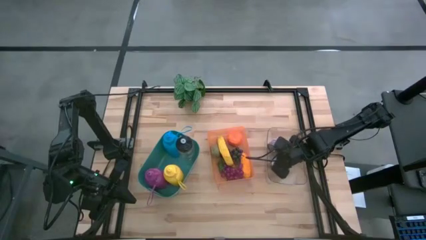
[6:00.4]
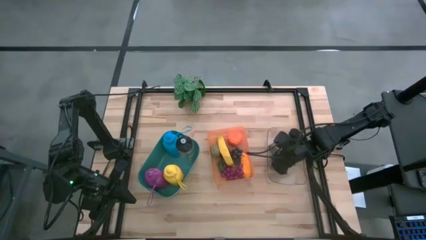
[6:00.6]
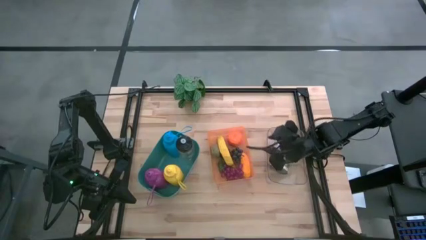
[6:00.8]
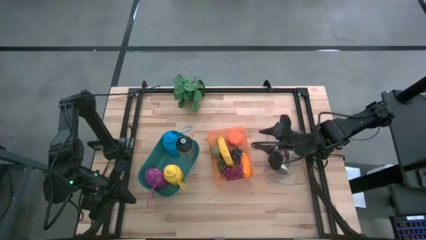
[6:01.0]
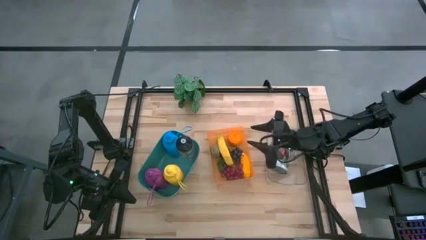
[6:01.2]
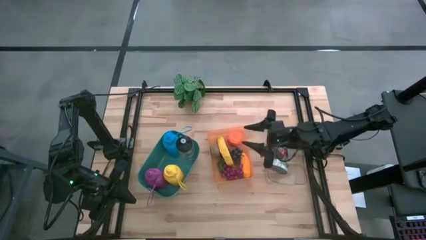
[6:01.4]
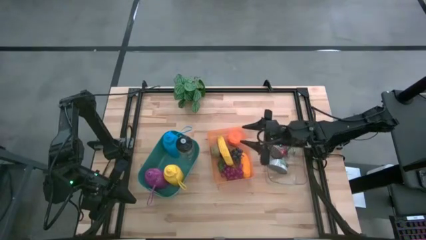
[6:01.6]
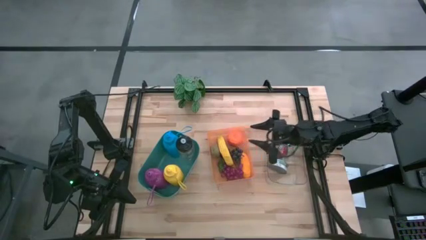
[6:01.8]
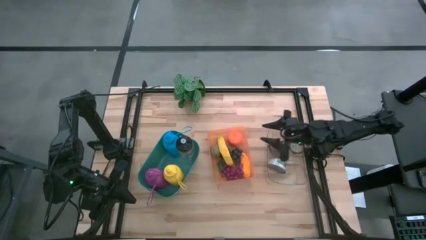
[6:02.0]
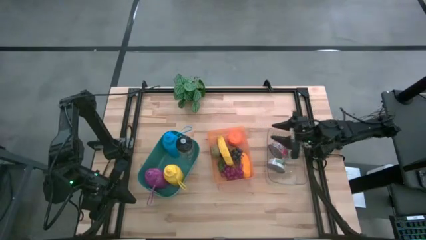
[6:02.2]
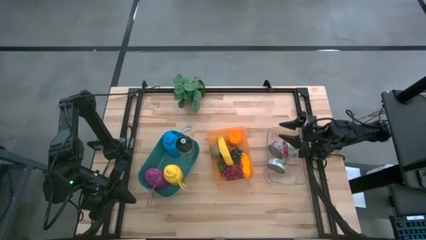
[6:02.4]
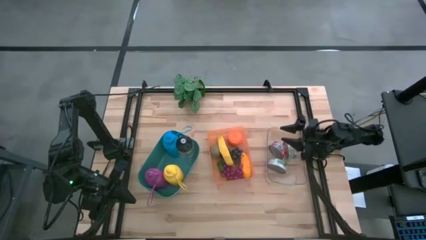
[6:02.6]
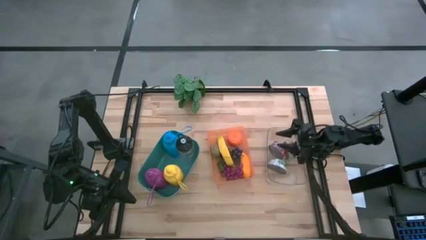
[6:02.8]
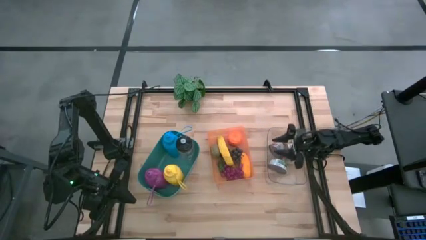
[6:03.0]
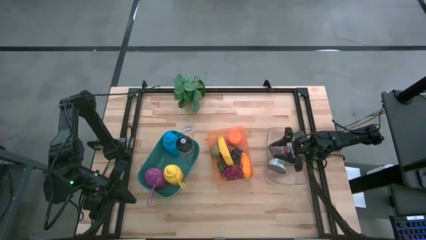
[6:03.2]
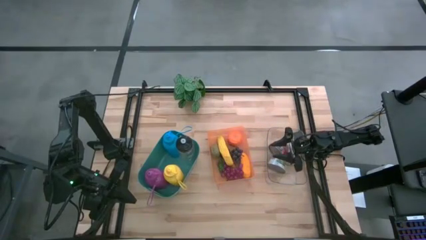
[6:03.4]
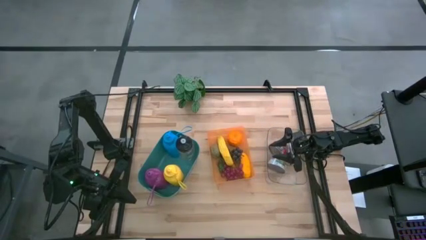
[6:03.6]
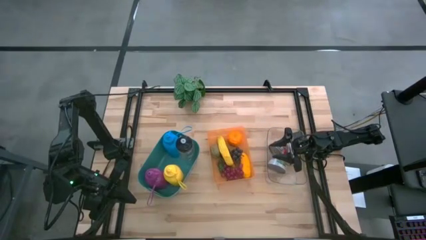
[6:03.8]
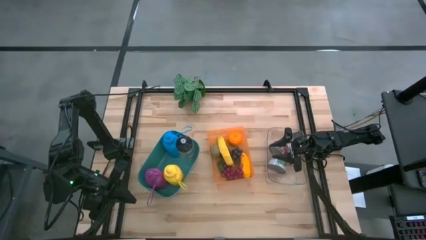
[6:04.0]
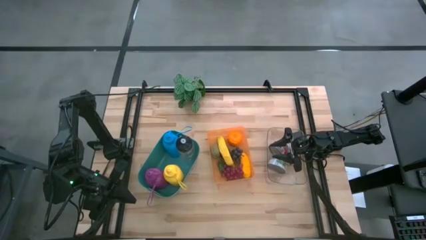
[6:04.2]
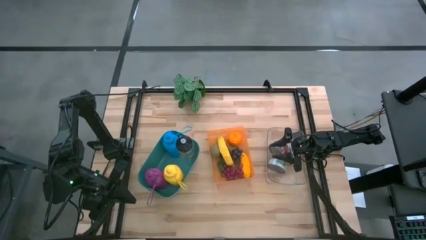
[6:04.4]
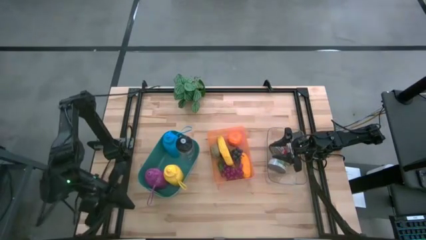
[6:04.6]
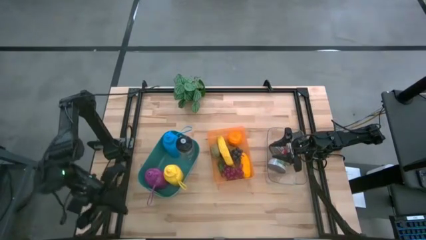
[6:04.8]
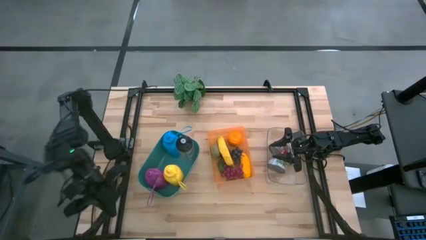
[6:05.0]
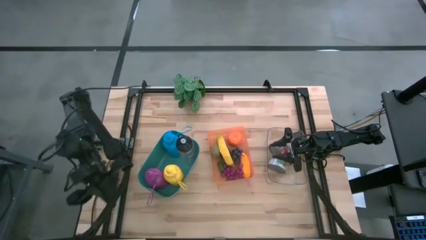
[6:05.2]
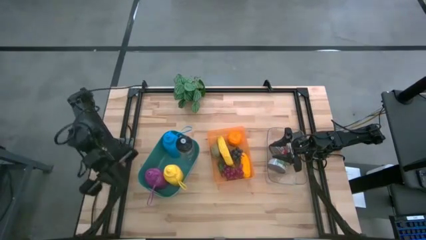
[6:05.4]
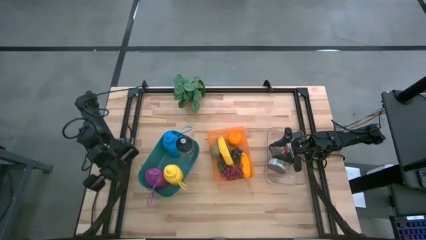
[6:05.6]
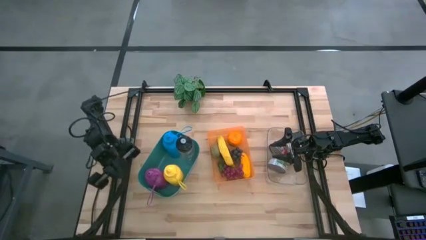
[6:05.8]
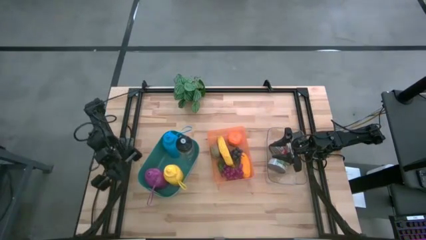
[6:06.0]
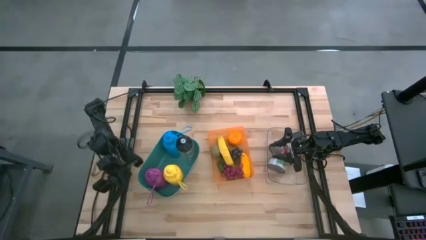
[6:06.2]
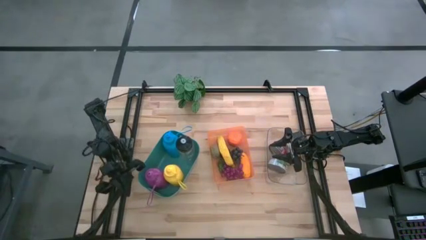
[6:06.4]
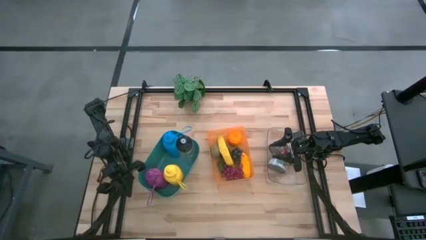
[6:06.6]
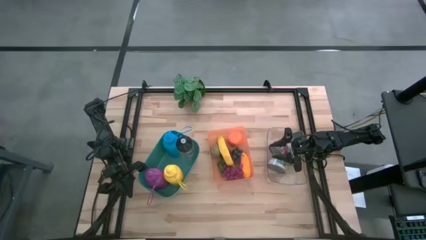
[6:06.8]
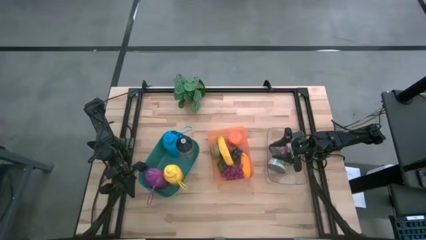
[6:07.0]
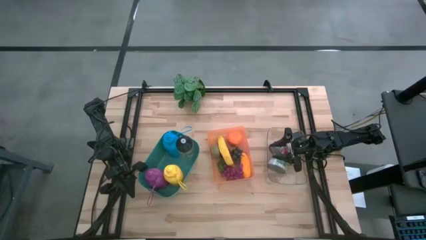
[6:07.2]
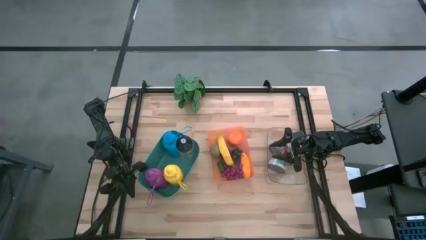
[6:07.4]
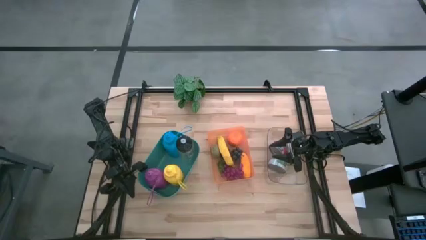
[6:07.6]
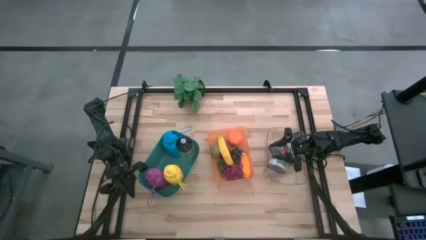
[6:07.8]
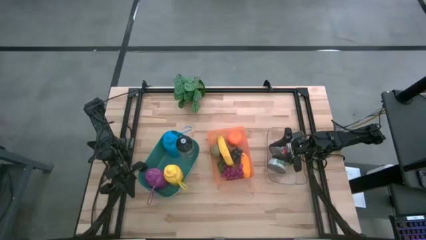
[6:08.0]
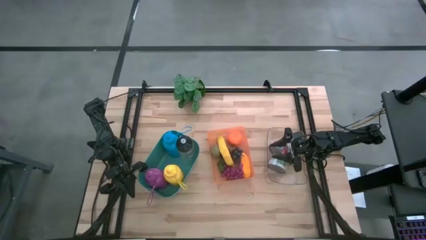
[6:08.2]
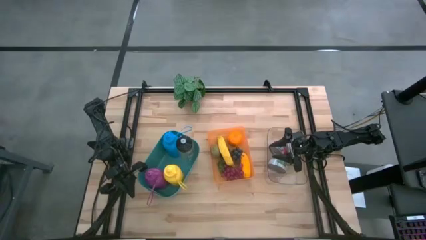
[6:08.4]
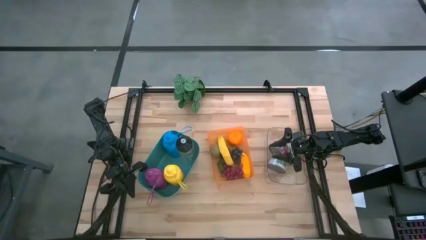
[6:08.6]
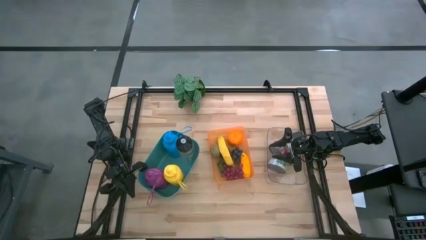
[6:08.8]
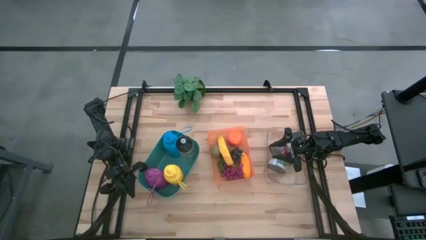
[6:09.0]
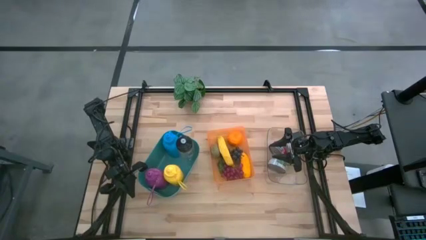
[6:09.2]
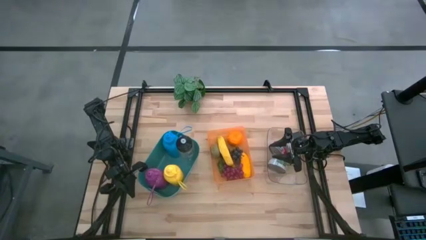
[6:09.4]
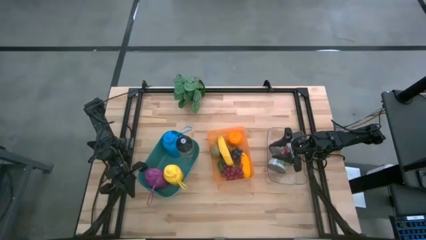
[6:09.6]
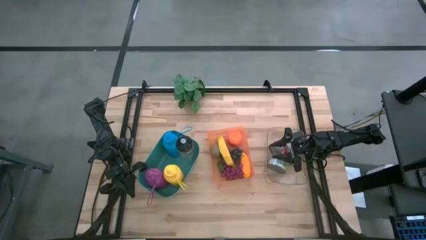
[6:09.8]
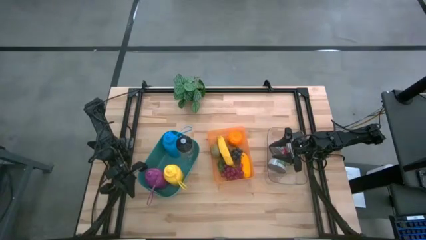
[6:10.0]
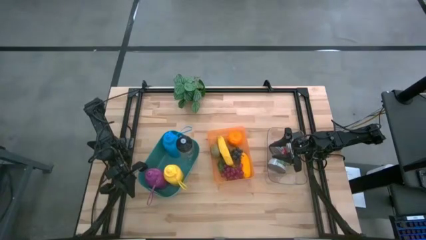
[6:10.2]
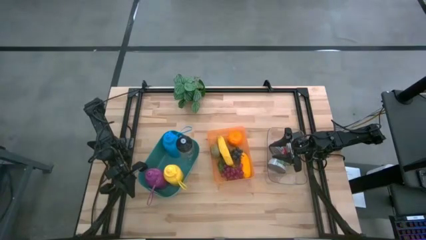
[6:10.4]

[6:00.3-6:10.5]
Task: Pick & Place Food Item
Return to Home Position

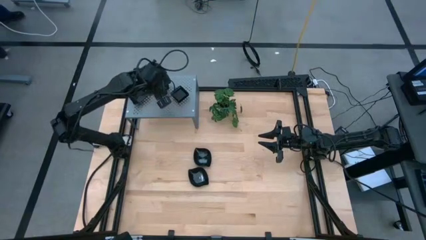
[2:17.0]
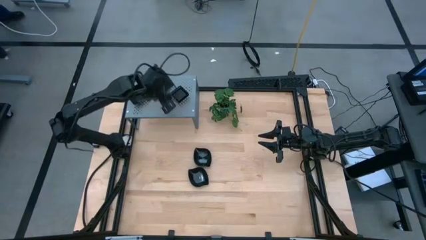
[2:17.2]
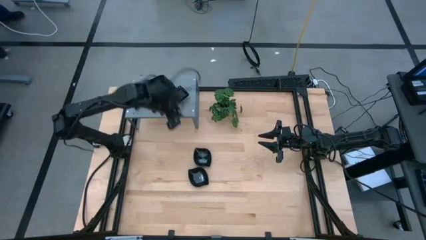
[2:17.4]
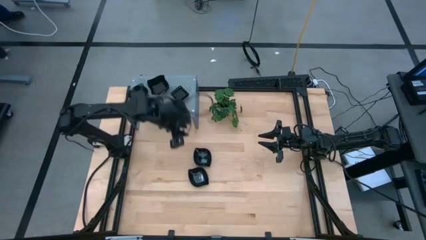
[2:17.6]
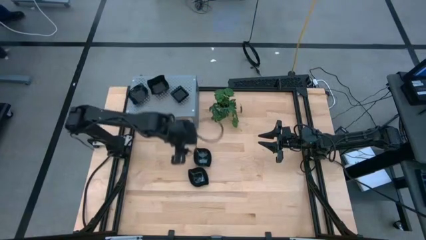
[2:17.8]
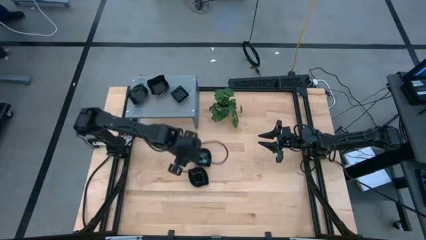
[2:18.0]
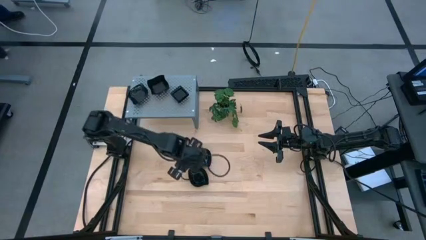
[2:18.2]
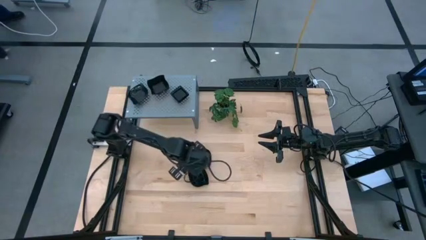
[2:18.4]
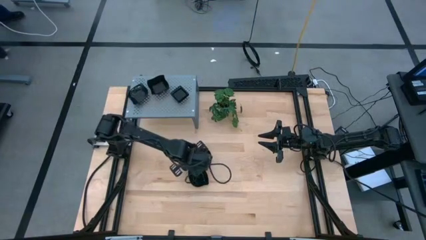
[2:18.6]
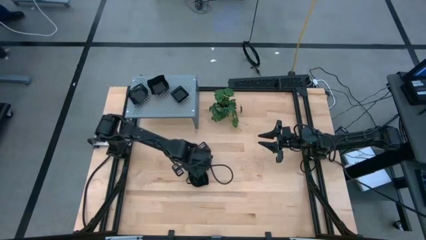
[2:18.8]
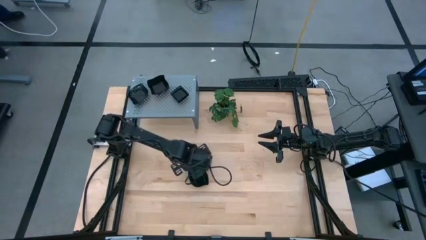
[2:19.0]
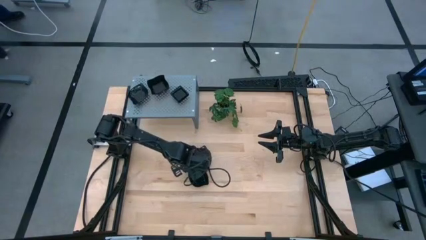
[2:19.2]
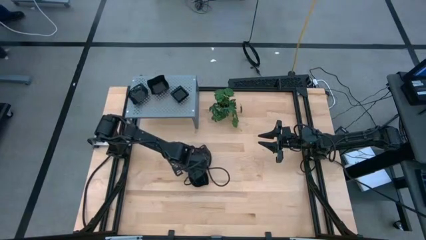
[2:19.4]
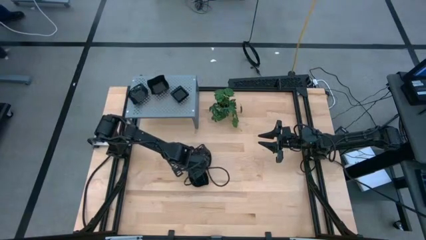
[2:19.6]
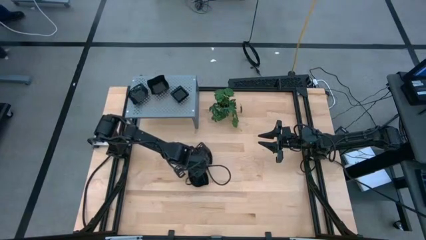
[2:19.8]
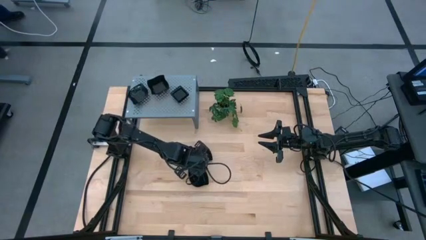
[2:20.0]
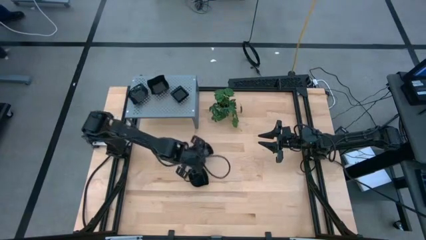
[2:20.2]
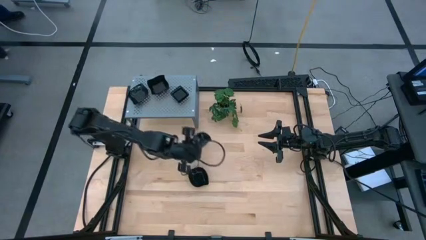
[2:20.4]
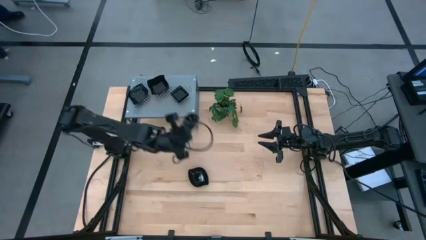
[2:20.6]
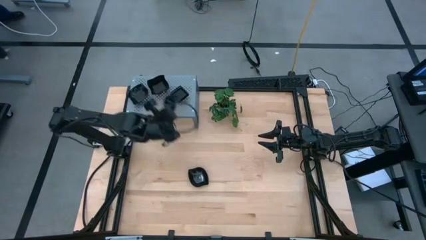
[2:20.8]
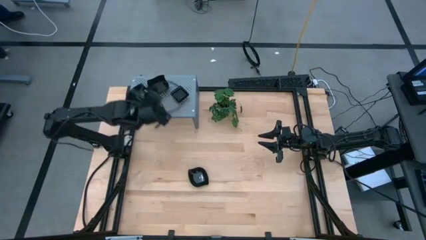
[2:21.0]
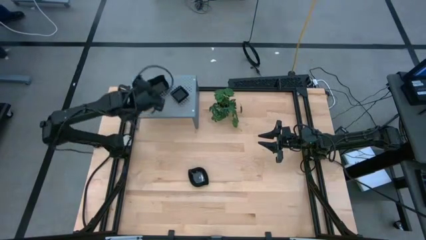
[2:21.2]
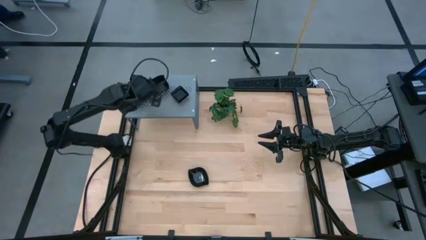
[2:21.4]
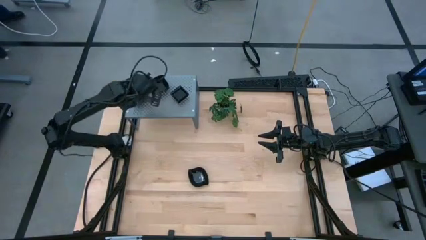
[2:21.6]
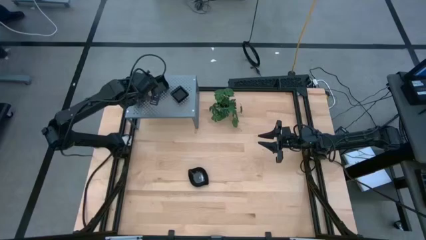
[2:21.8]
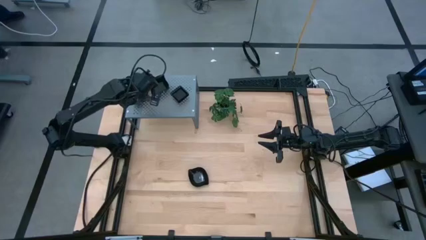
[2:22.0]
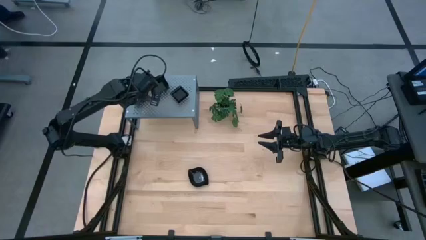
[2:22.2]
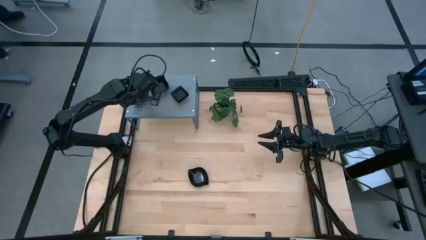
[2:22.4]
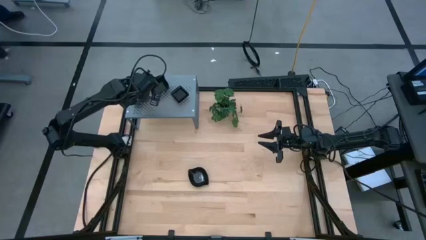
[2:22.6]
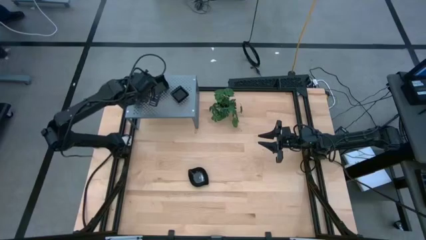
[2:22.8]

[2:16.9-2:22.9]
Task: Pick & Place Mini shaped plates
Stack the black leaf plate on top of the black leaf plate on the shelf
